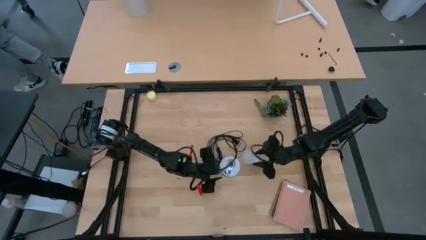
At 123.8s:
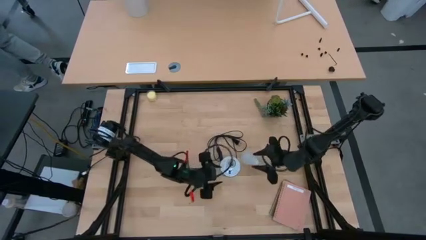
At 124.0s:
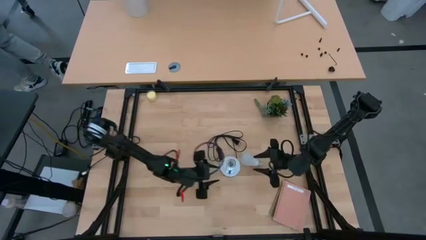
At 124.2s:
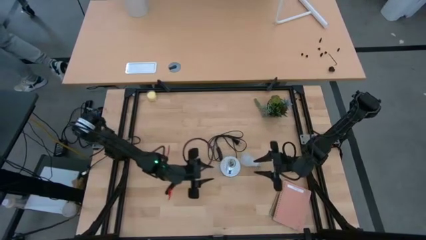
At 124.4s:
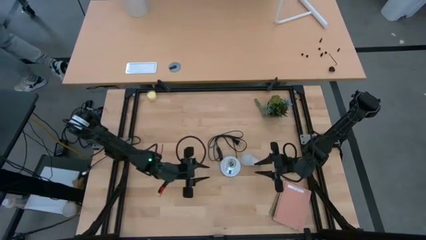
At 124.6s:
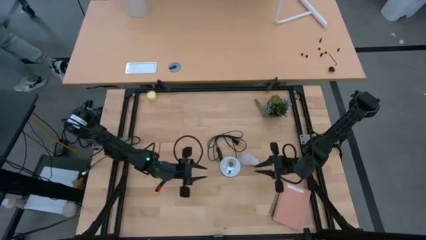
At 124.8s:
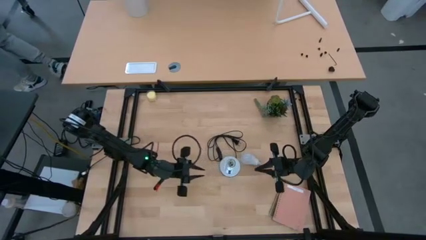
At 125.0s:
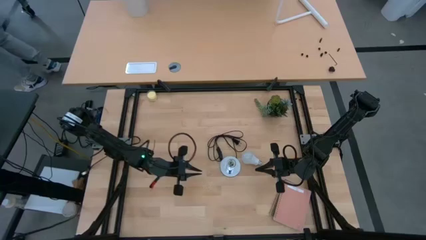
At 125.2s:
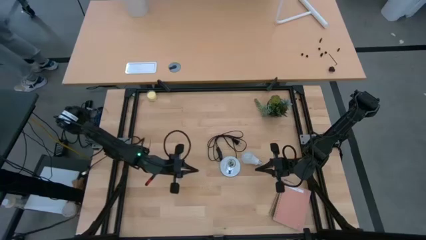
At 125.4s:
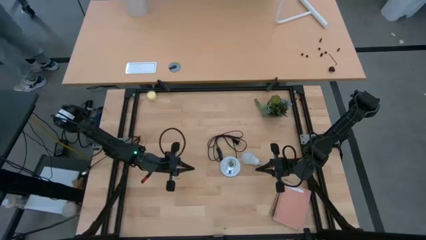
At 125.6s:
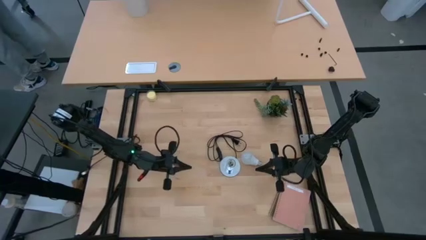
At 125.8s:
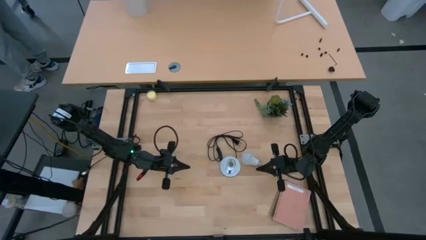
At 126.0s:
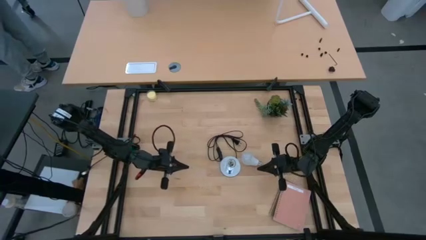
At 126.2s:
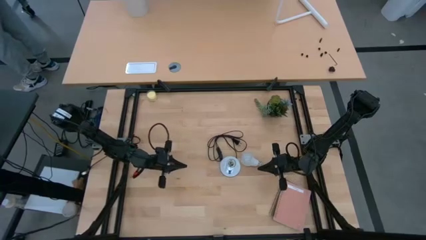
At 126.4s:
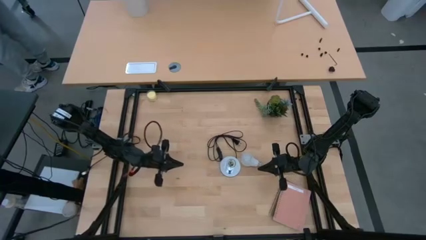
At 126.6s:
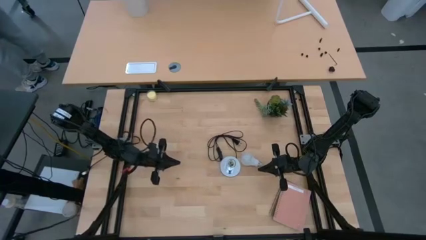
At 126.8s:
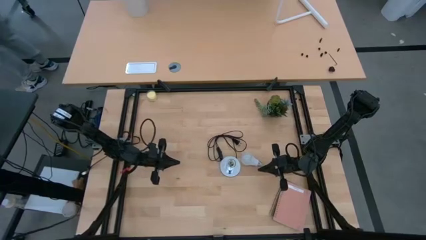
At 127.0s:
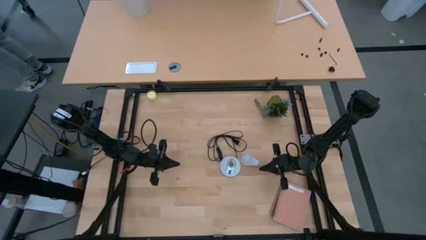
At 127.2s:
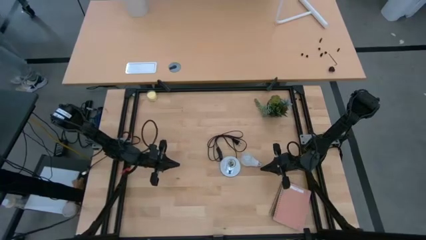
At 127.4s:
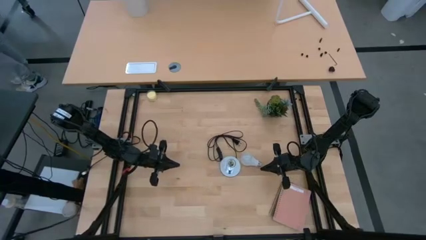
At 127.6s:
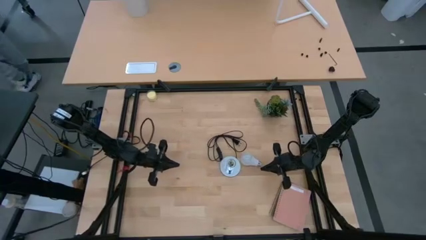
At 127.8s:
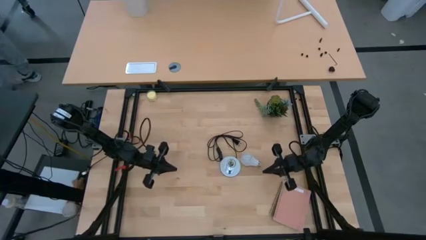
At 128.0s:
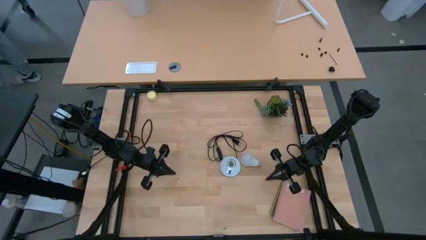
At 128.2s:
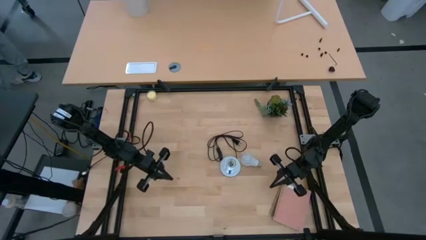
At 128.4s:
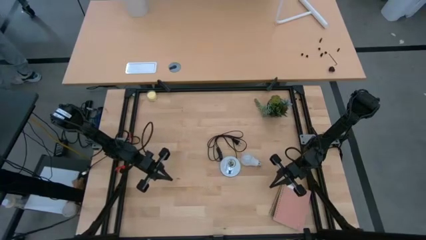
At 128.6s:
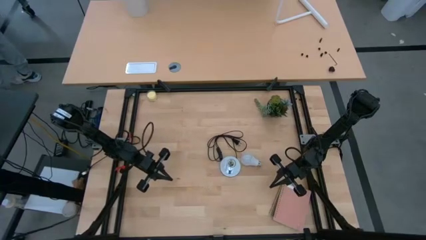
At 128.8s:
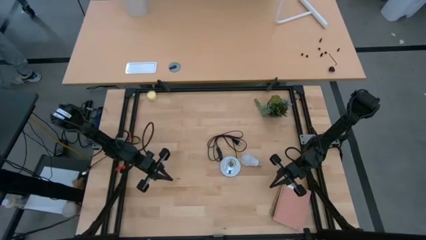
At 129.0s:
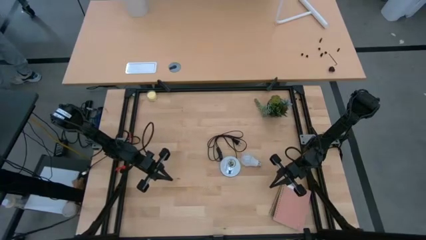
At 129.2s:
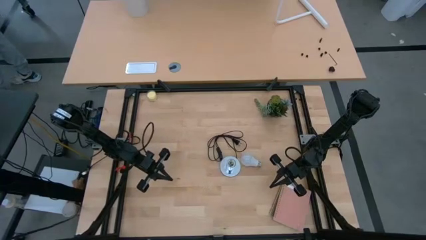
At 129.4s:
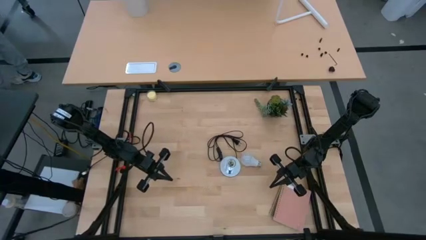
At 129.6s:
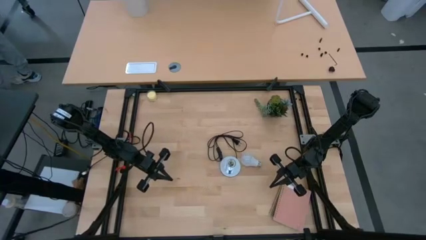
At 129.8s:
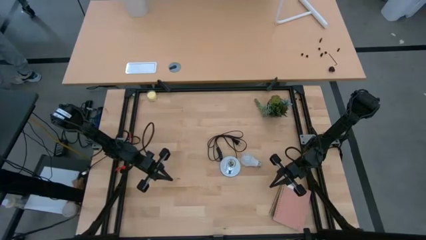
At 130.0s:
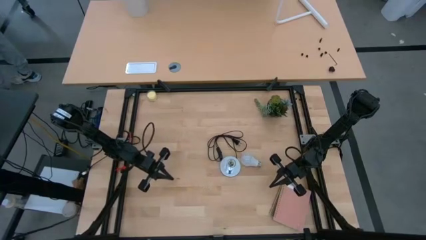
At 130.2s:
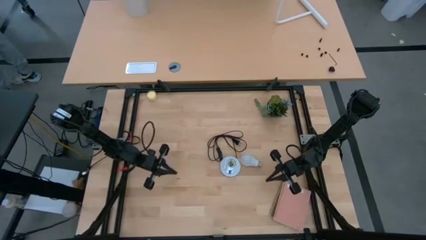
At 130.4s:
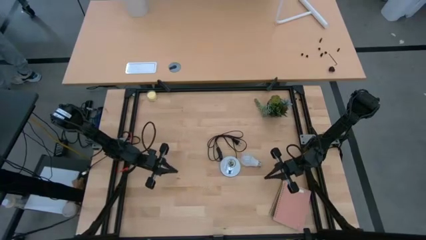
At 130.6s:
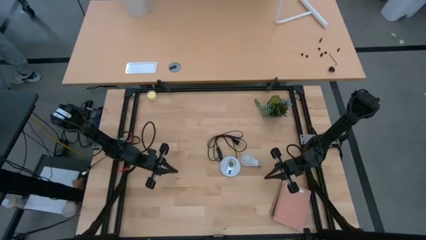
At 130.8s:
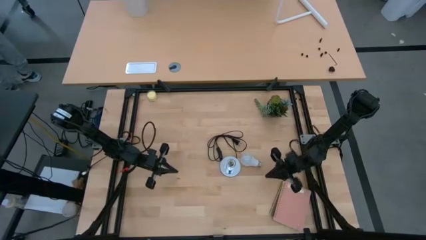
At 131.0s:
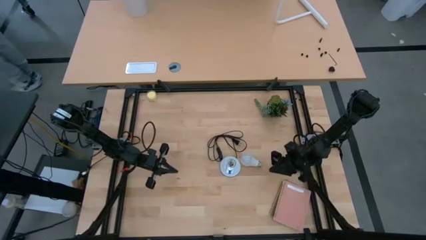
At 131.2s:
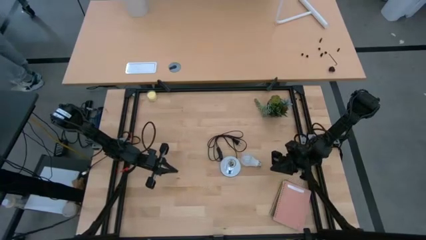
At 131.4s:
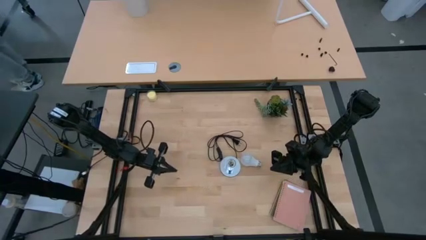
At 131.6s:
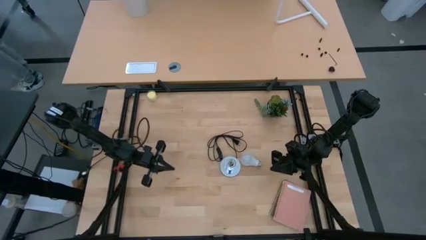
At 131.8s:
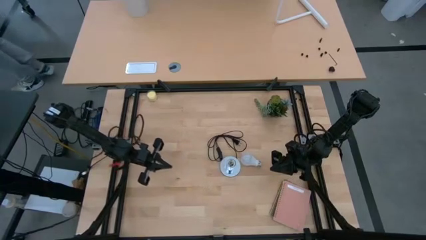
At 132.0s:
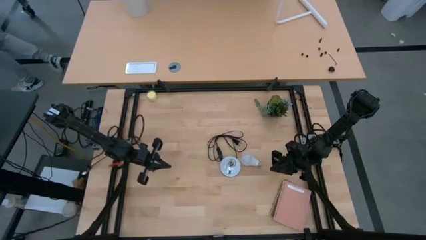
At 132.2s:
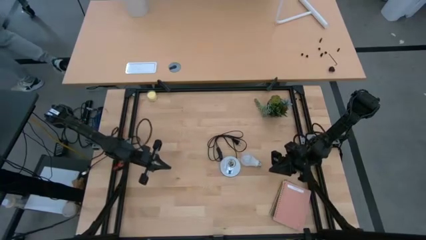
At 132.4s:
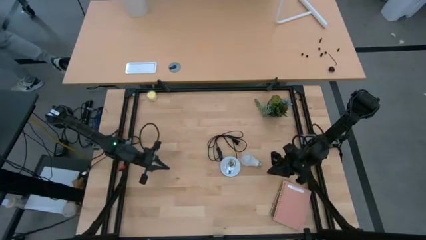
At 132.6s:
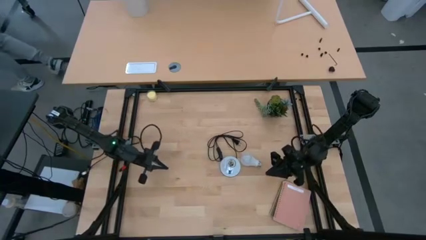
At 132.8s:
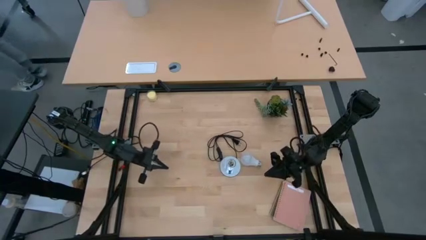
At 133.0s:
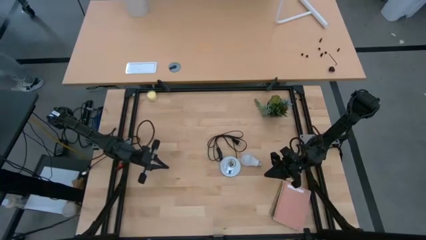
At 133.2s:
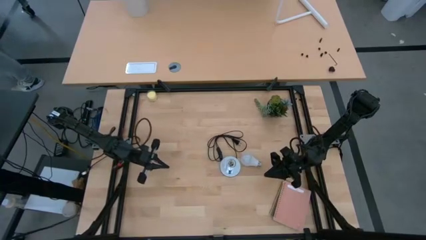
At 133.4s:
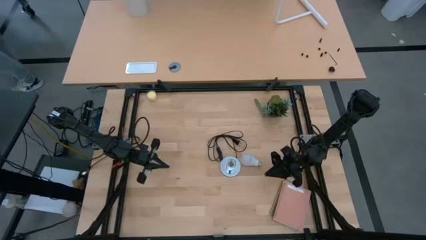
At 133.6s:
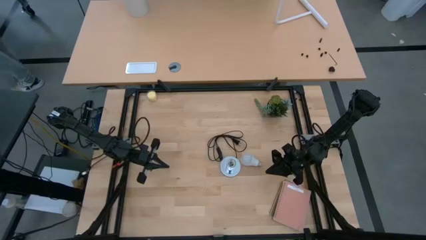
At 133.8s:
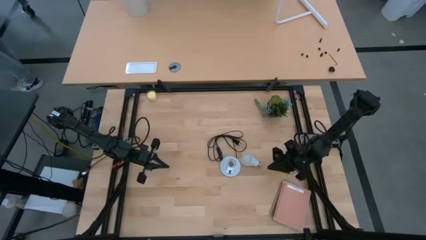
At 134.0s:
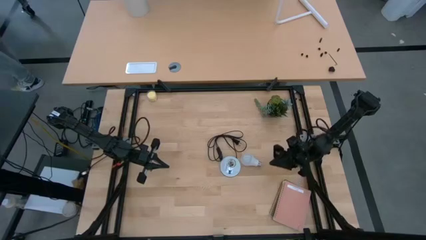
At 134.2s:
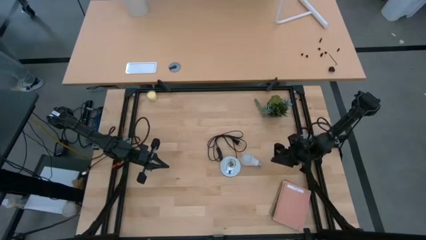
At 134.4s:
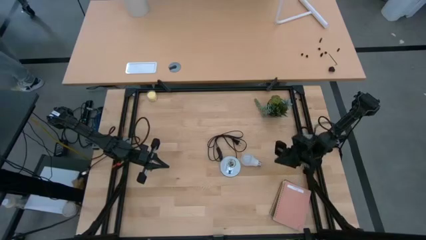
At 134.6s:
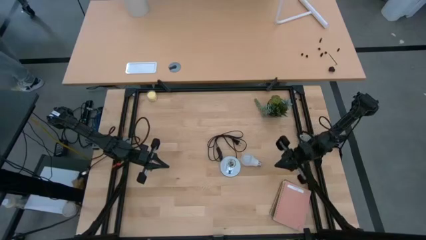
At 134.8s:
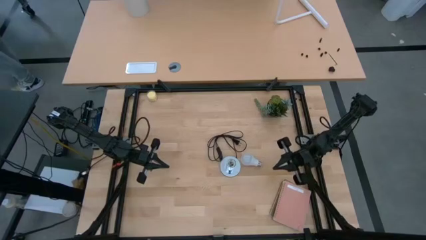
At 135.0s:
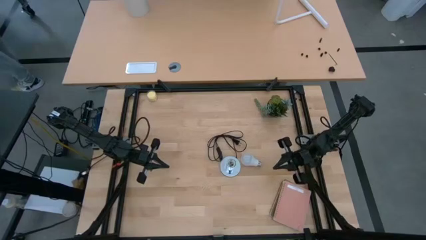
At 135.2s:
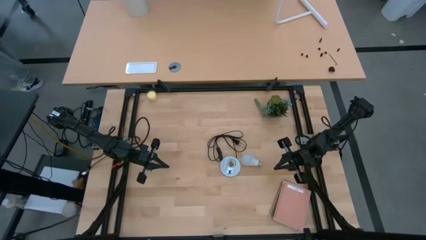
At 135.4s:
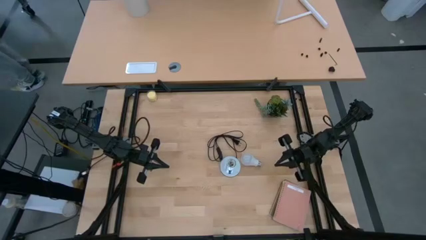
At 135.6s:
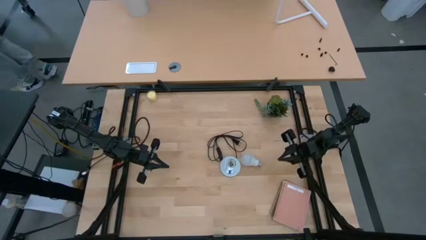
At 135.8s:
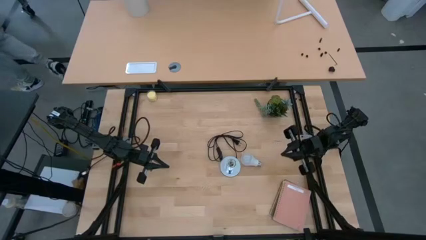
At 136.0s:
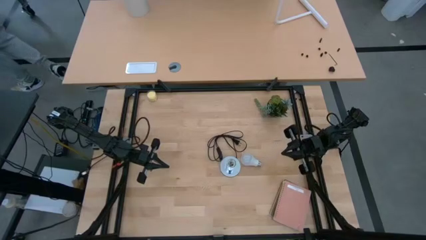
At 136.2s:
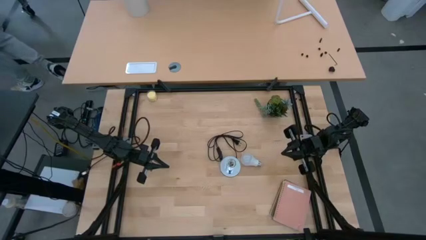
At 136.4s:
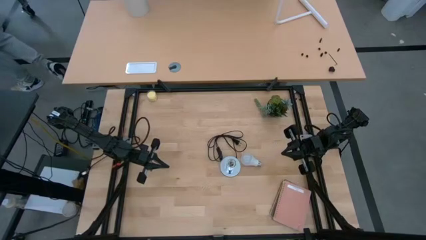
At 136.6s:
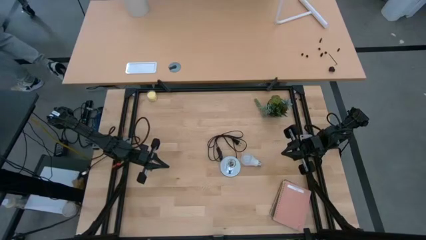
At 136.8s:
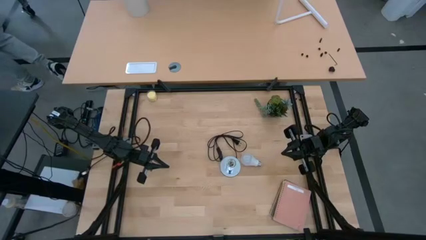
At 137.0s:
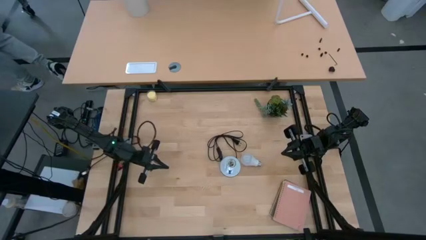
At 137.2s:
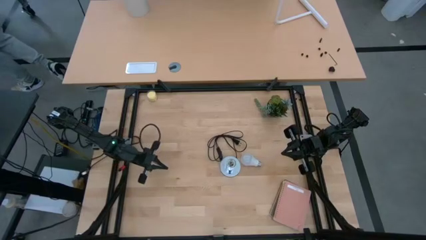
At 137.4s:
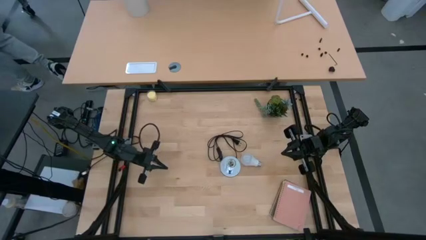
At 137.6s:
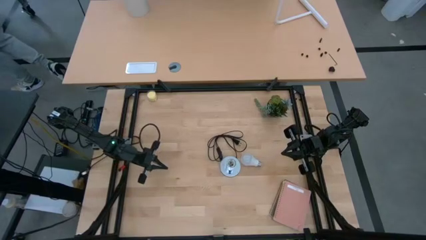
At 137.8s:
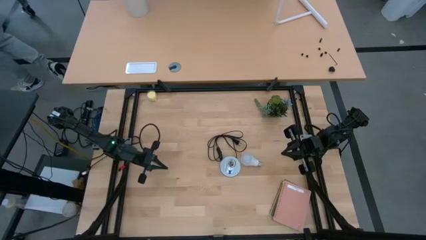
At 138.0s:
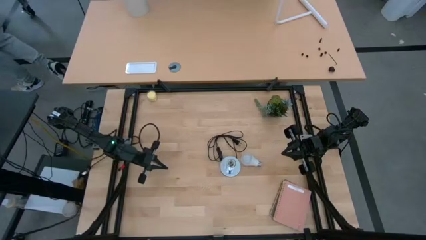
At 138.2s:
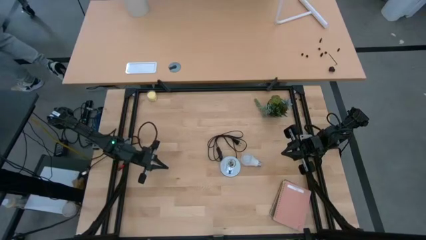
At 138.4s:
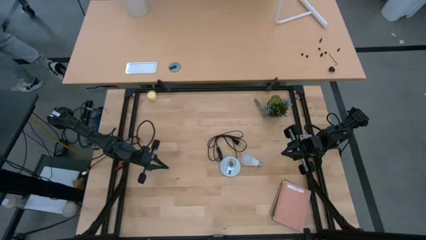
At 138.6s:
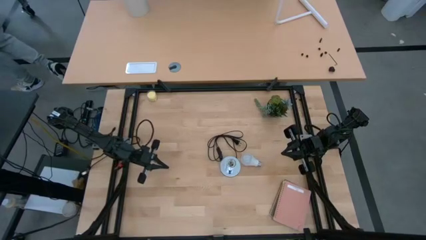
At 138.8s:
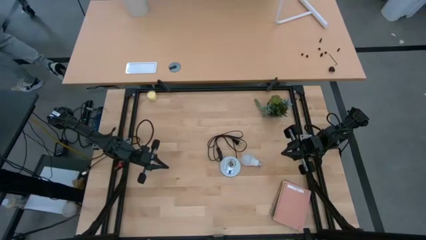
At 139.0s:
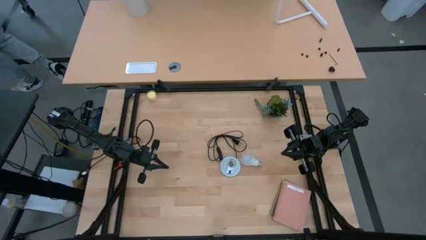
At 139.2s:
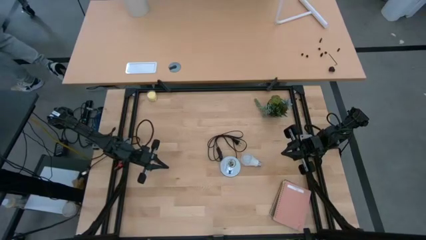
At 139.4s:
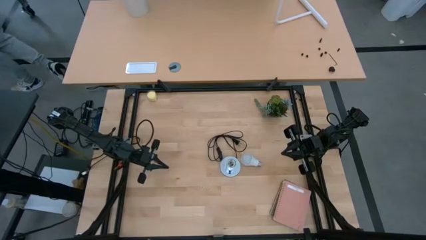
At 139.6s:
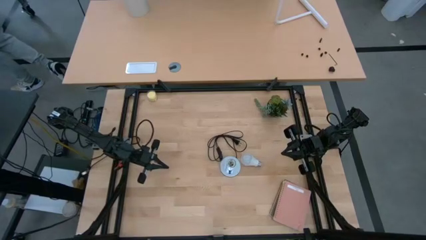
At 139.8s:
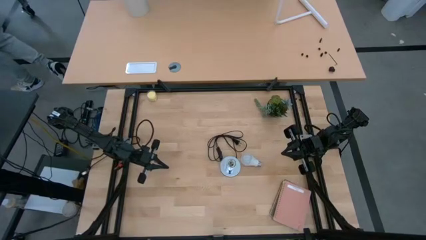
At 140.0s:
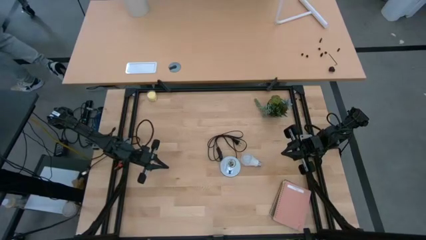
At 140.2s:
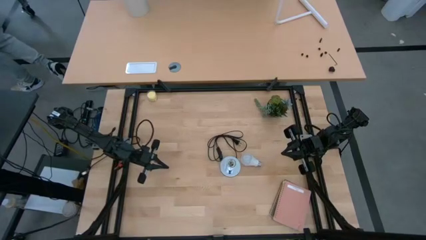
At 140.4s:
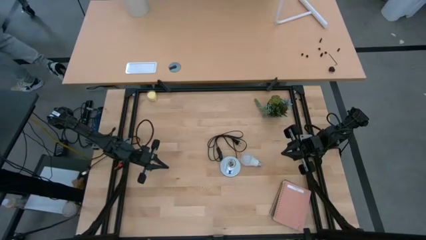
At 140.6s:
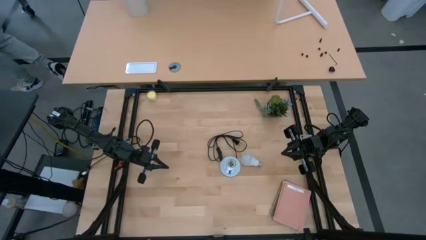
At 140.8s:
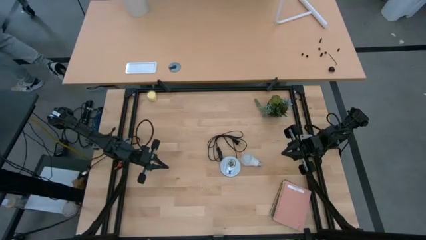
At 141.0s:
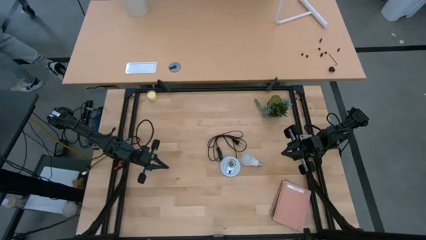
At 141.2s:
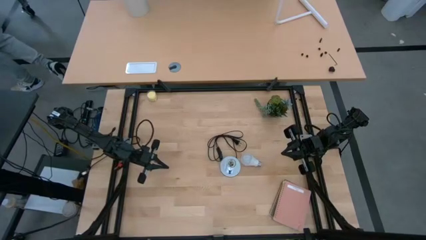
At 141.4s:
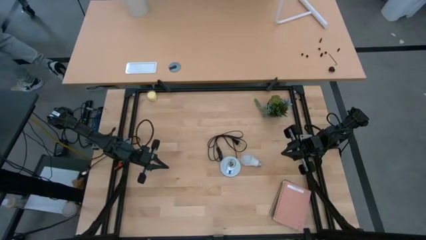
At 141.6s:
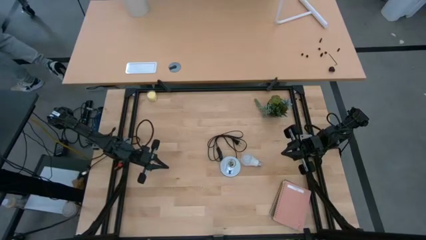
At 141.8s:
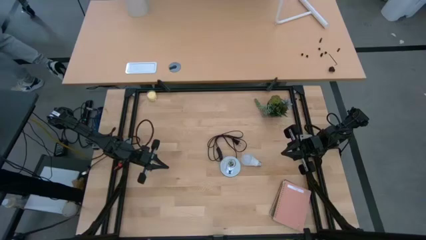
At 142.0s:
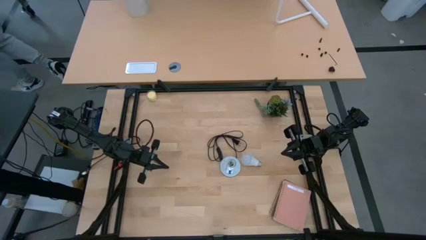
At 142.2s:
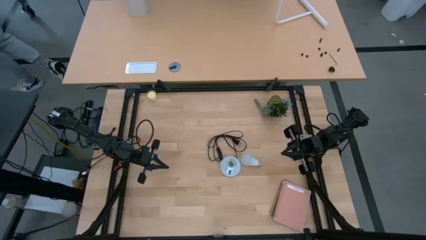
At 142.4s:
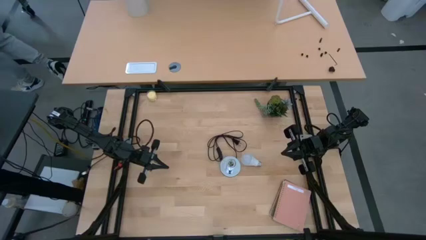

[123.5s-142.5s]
Task: Screw lightbulb
Return to Home Position
